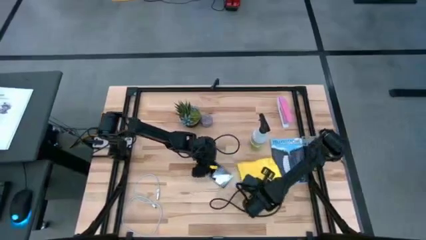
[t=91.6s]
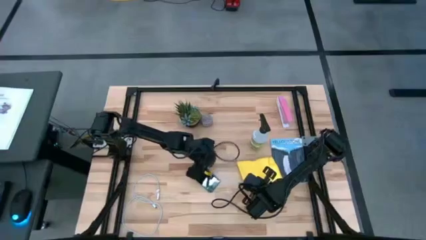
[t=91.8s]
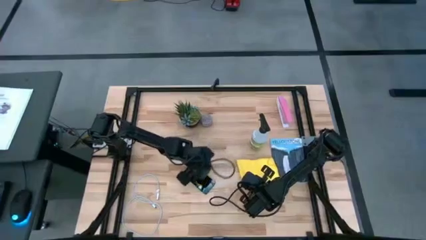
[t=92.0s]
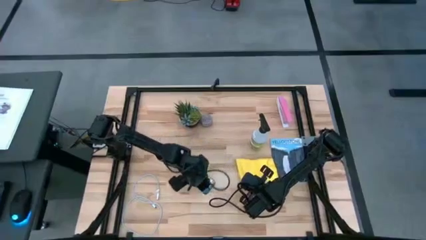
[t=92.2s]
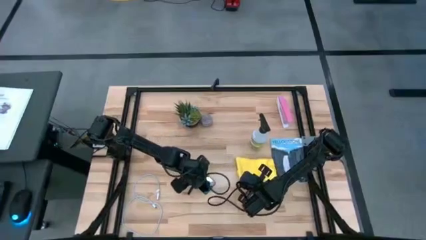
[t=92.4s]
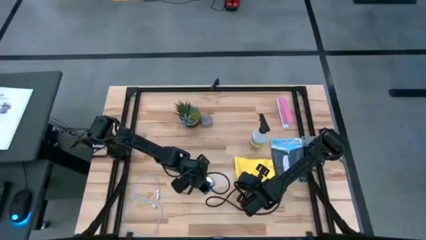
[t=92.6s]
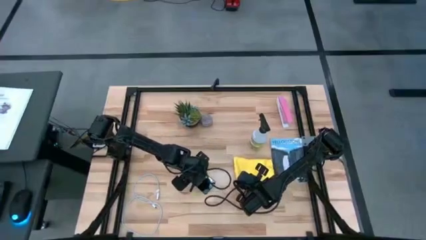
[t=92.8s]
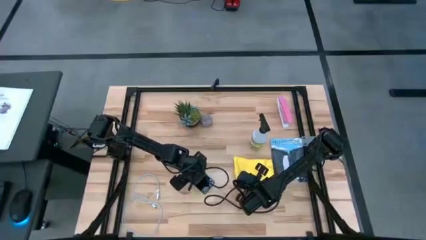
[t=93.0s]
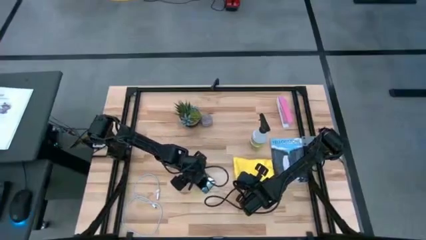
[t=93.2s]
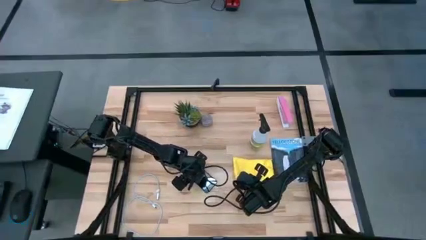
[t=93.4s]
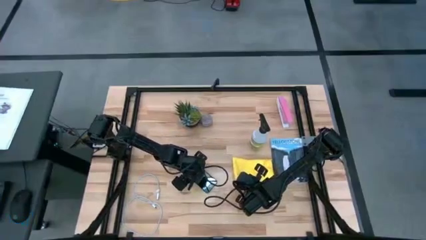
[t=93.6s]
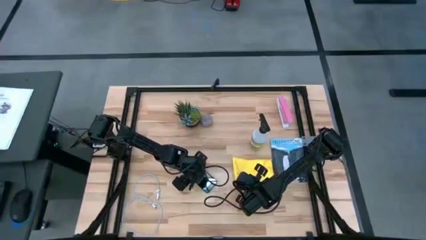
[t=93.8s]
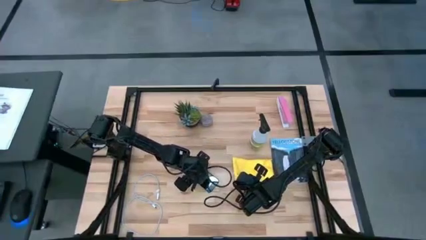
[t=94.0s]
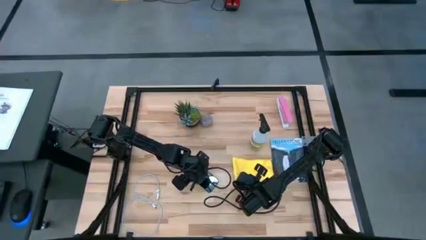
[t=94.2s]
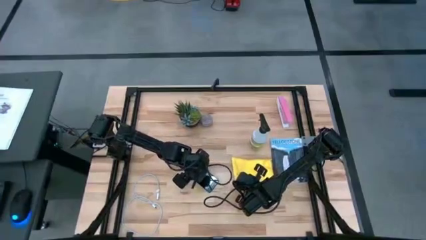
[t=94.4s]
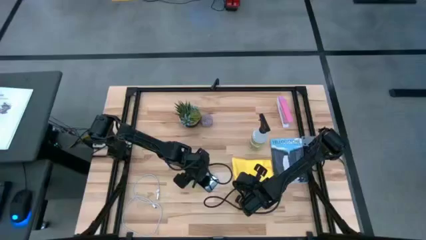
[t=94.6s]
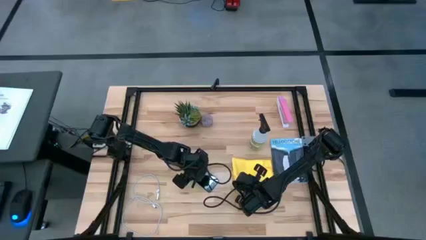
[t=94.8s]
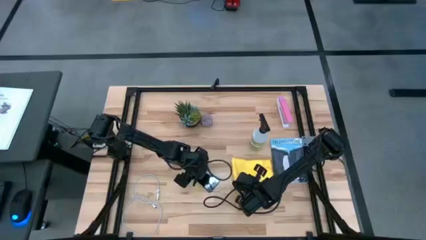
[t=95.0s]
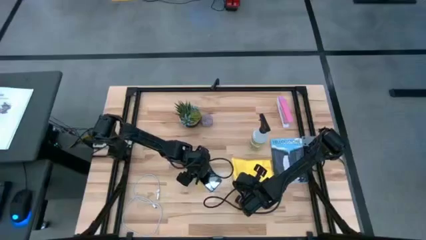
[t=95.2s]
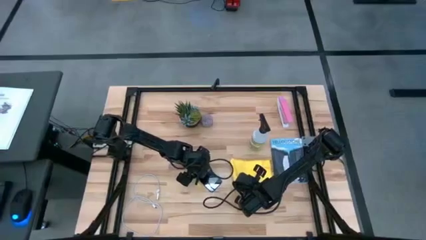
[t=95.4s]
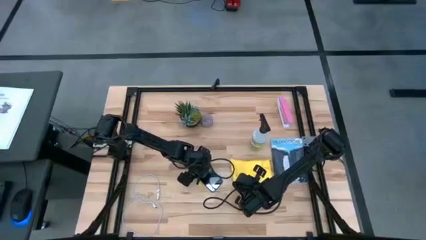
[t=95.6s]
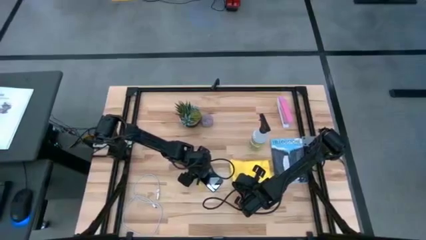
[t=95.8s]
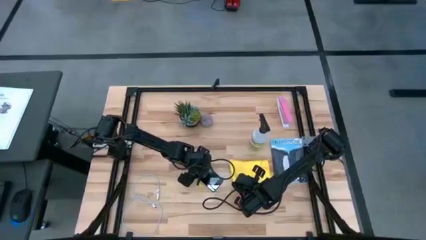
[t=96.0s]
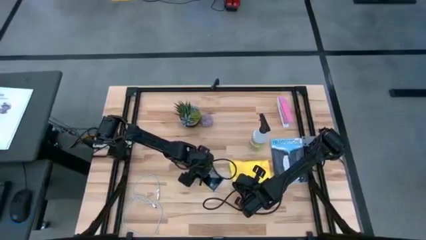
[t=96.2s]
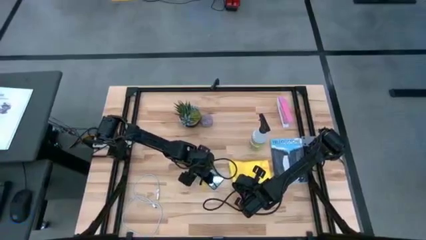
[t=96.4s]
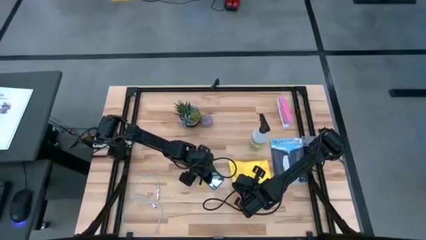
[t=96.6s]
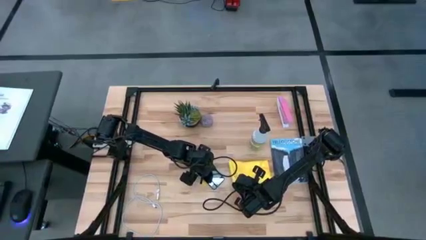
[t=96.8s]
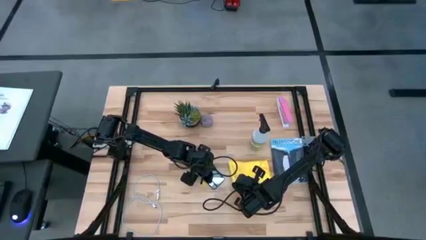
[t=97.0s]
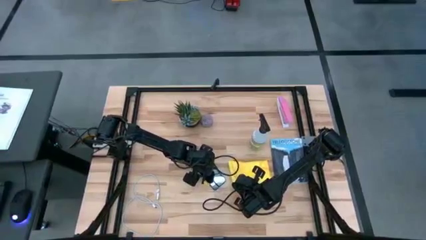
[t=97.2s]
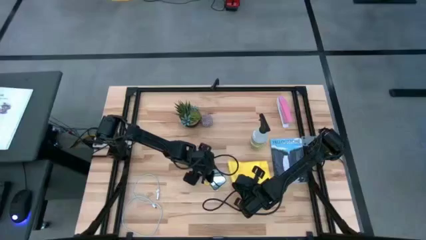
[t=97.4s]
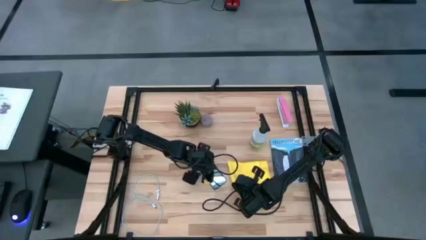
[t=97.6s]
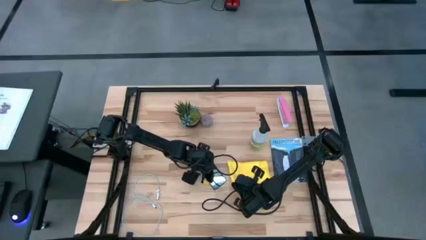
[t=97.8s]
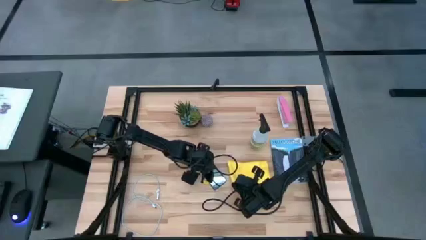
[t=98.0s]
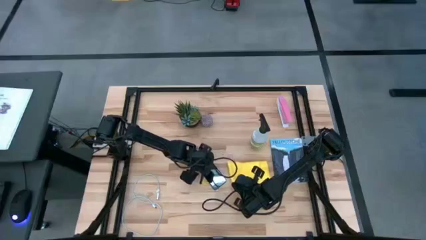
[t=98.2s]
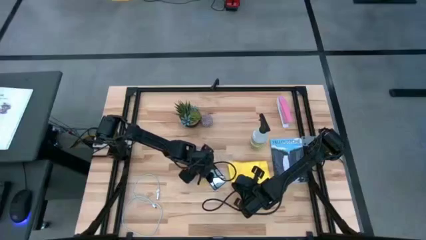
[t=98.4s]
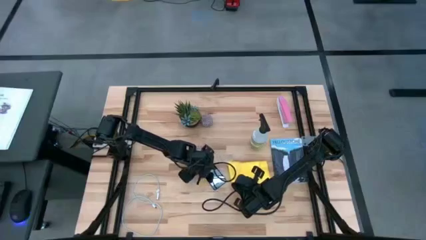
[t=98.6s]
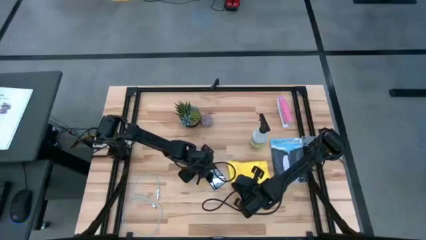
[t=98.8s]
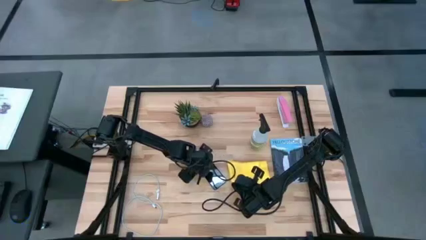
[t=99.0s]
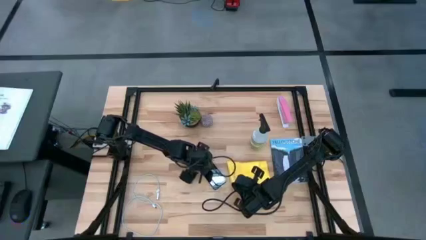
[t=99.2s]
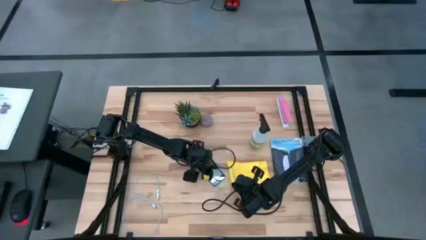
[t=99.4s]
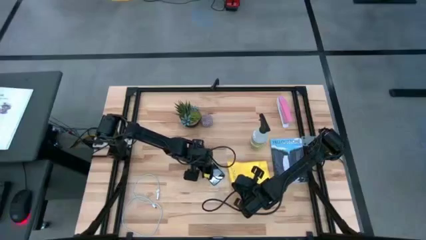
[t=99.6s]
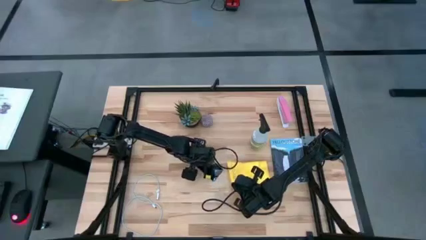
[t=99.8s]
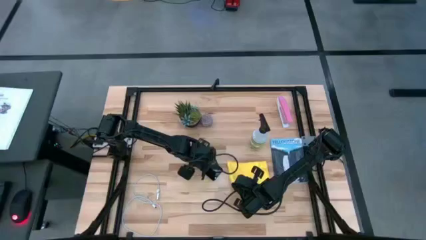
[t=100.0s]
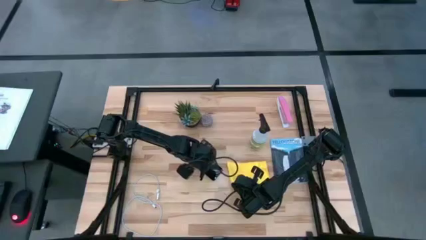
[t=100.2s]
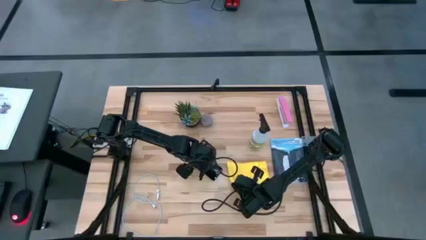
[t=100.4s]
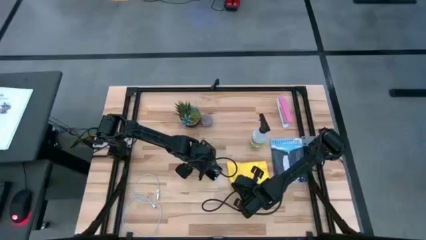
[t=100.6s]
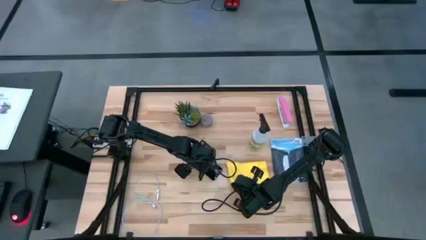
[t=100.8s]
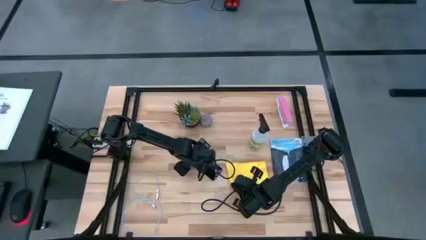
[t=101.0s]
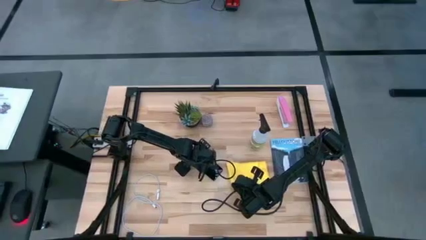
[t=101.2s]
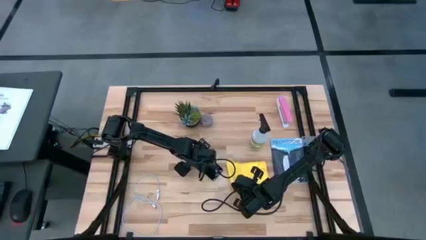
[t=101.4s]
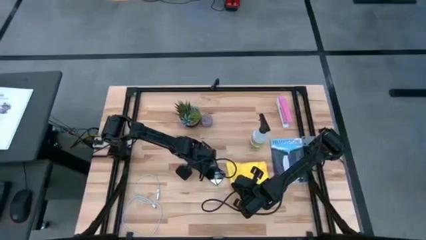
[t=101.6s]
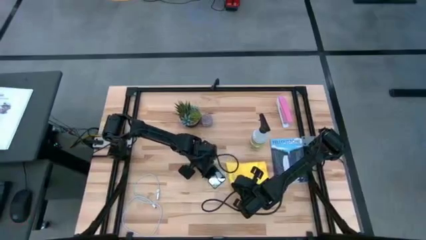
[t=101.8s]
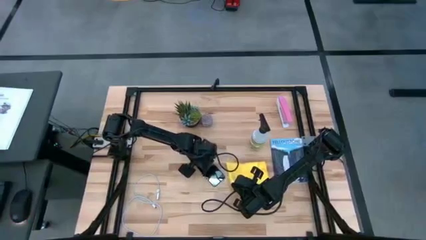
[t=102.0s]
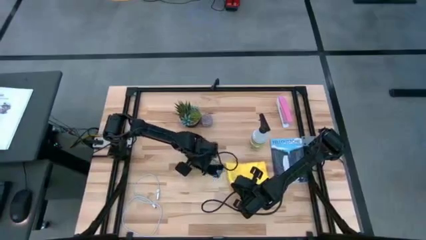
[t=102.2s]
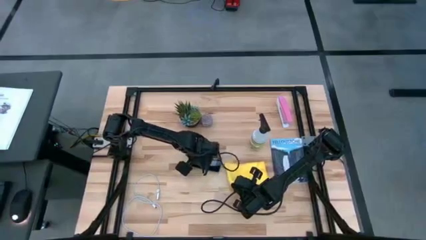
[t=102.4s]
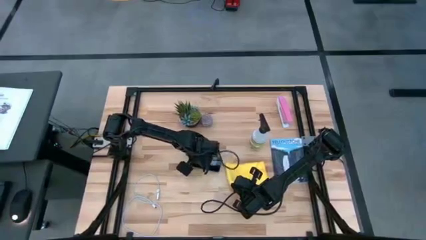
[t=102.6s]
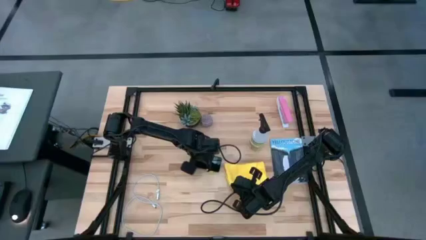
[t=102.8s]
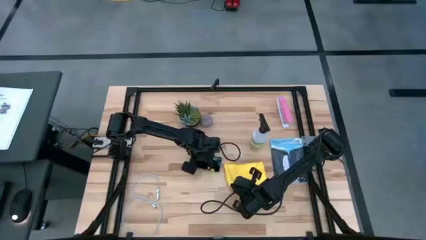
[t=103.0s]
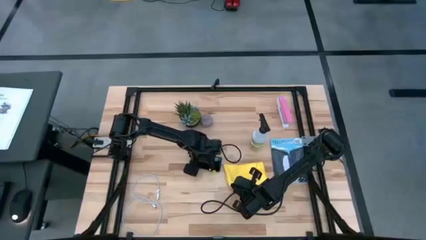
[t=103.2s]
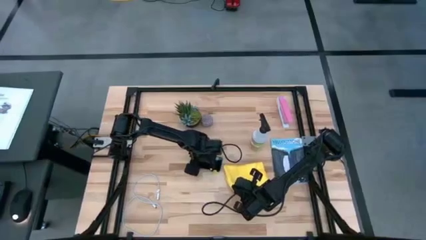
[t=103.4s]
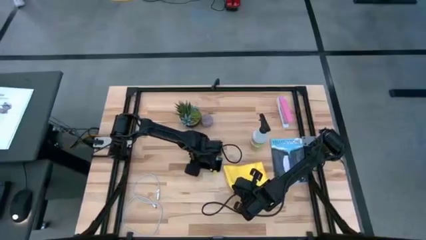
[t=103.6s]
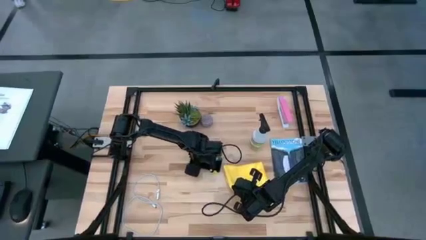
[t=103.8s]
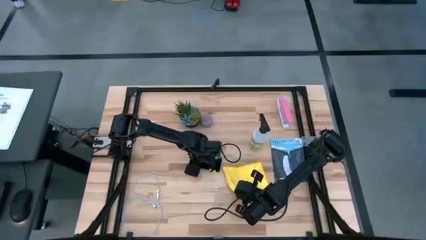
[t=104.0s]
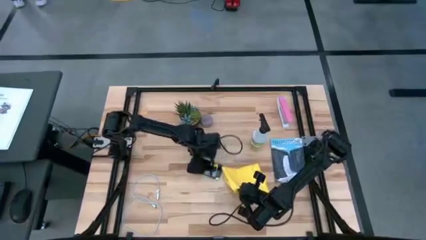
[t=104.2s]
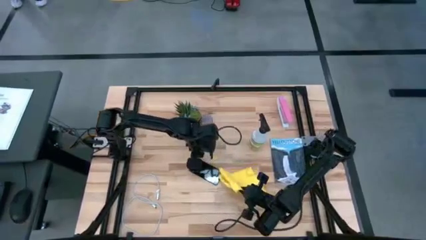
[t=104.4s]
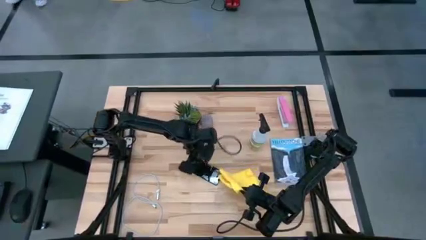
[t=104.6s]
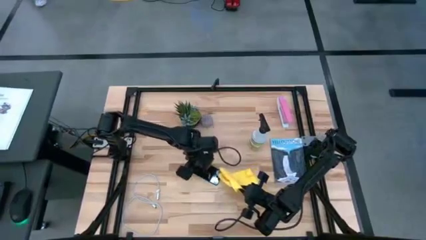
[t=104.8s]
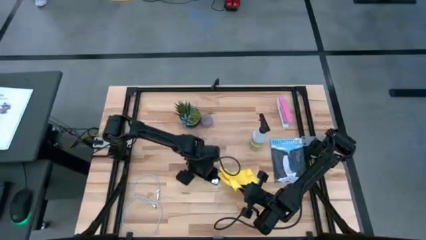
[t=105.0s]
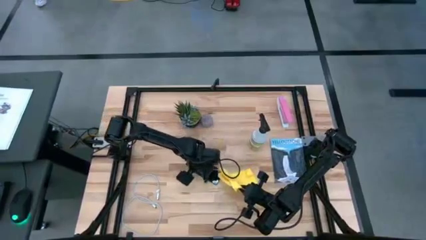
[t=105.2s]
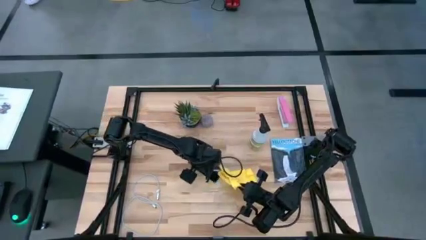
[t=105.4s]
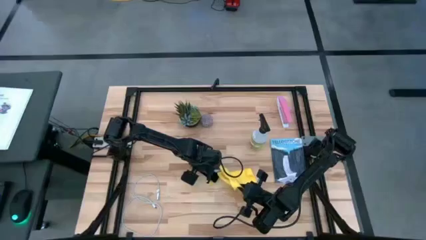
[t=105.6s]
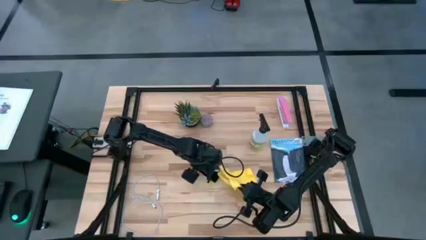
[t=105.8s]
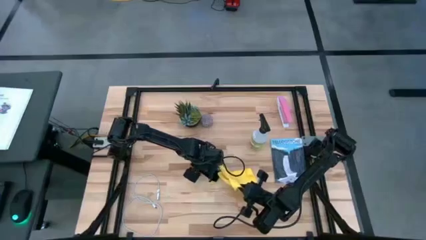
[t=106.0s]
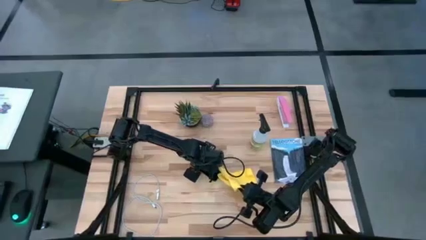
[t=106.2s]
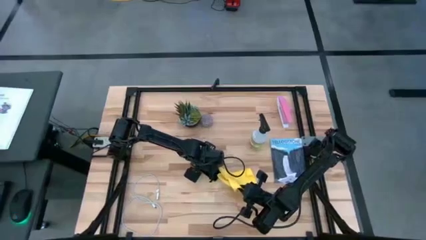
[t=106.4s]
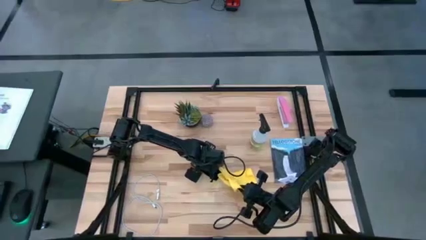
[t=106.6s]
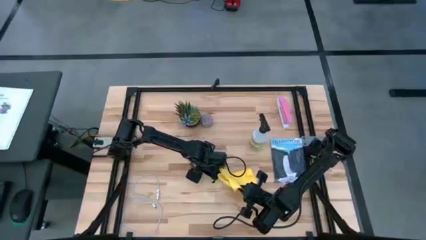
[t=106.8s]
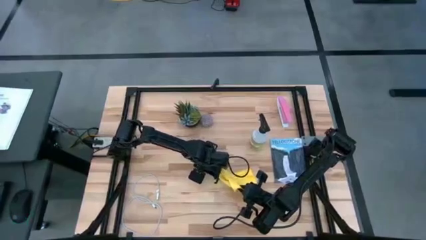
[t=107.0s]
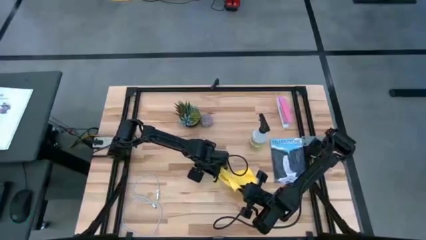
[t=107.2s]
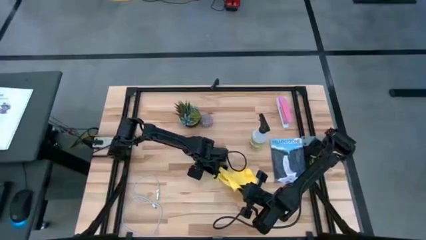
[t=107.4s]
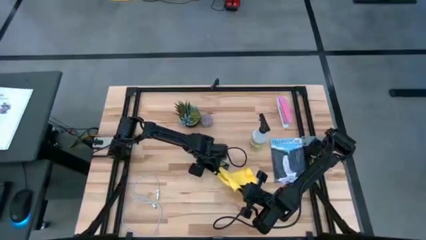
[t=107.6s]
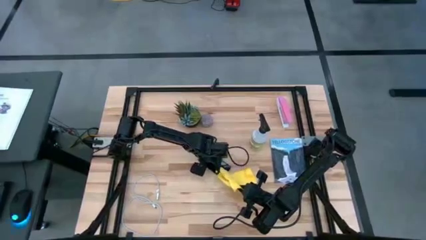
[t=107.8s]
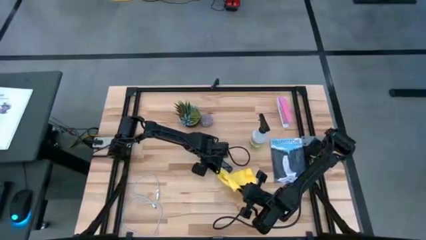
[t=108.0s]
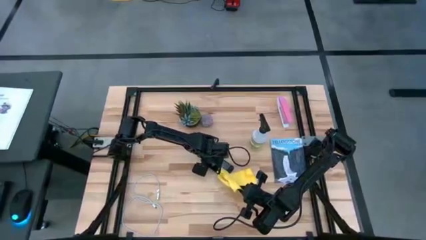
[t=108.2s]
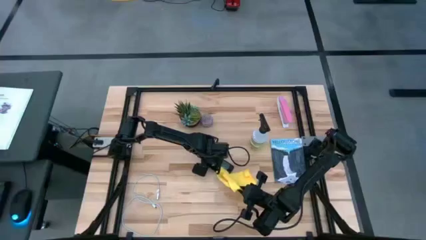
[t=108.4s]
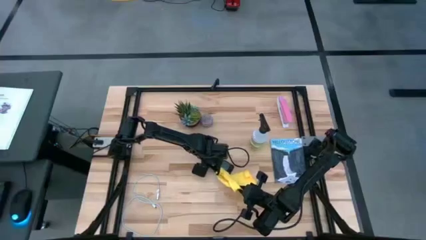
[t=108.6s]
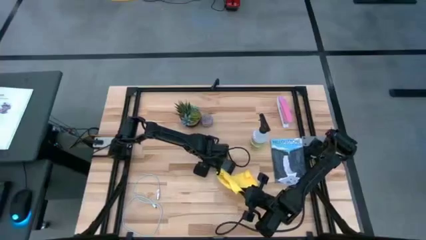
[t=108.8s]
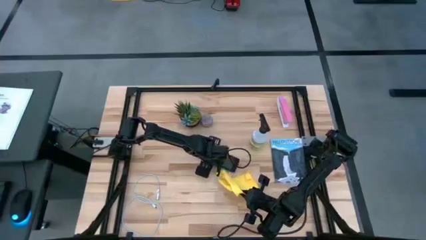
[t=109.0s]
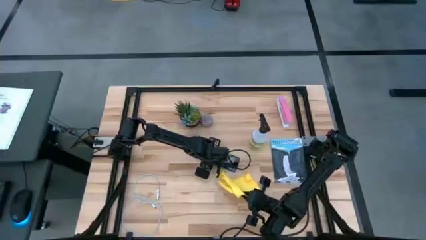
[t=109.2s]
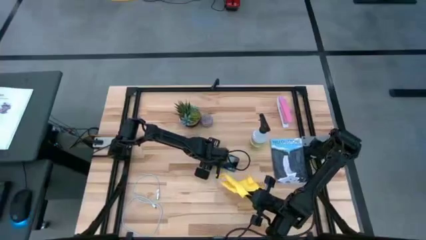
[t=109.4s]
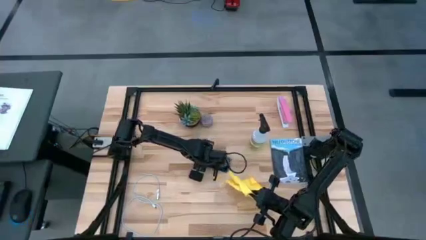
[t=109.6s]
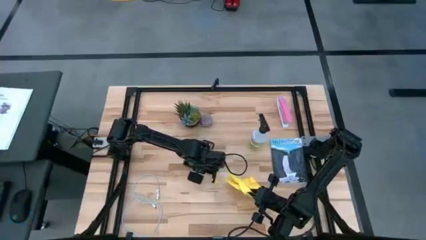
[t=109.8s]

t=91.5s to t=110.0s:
Task: Apply microfiber cloth
Wipe the back side of the cellphone using the yellow microfiber cloth
